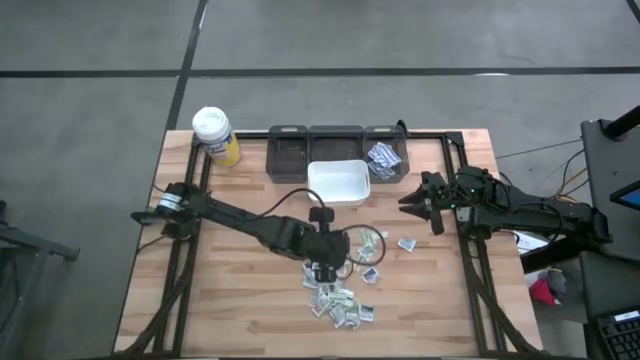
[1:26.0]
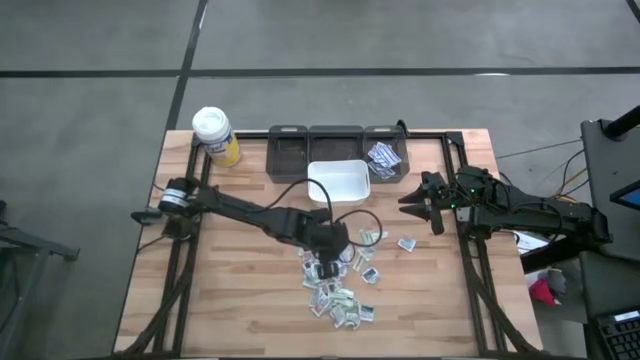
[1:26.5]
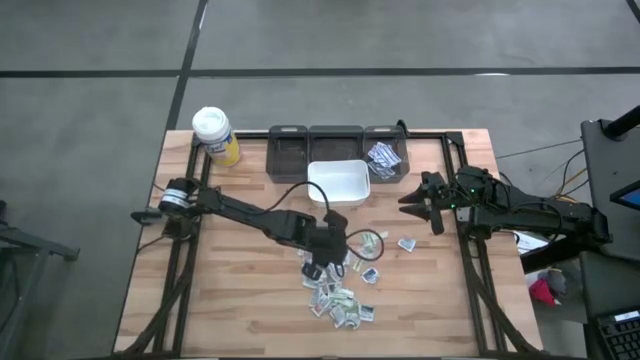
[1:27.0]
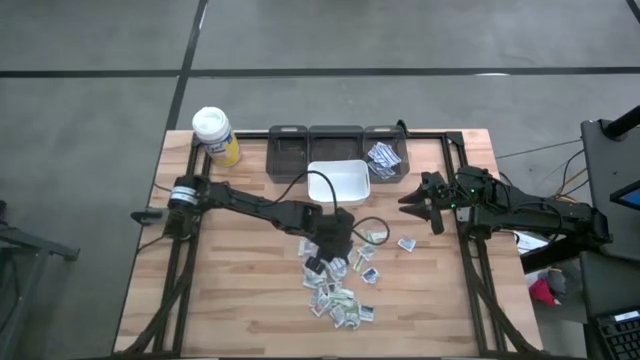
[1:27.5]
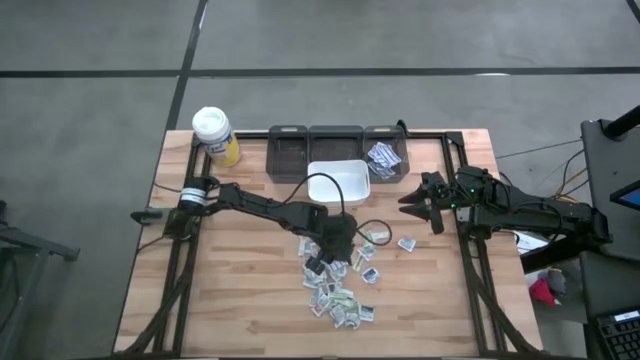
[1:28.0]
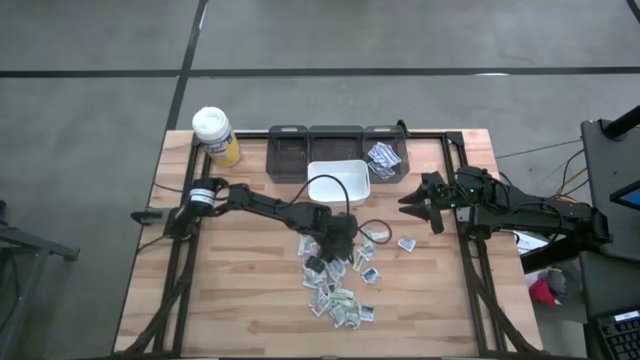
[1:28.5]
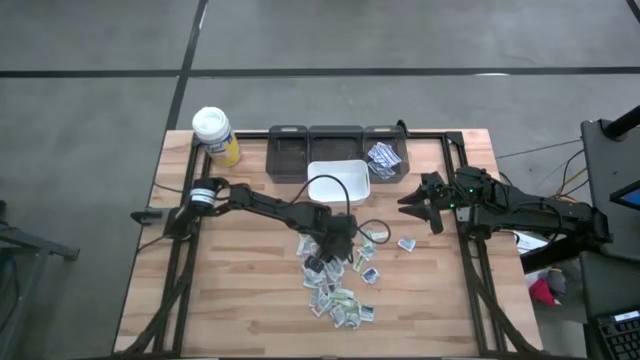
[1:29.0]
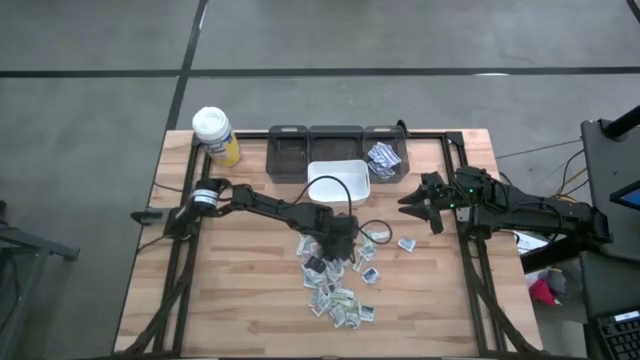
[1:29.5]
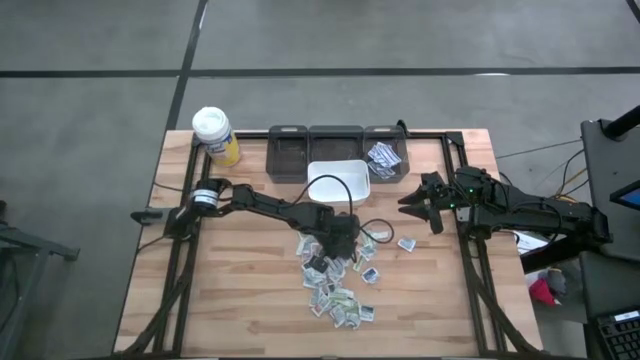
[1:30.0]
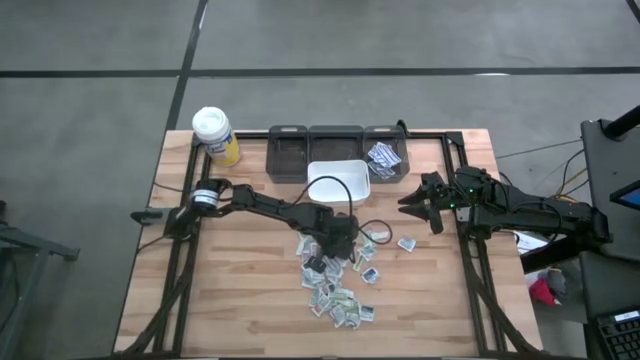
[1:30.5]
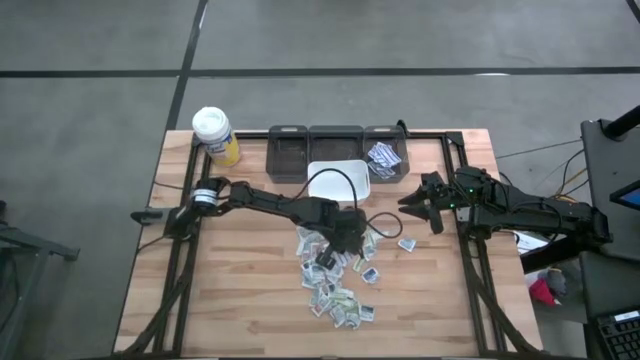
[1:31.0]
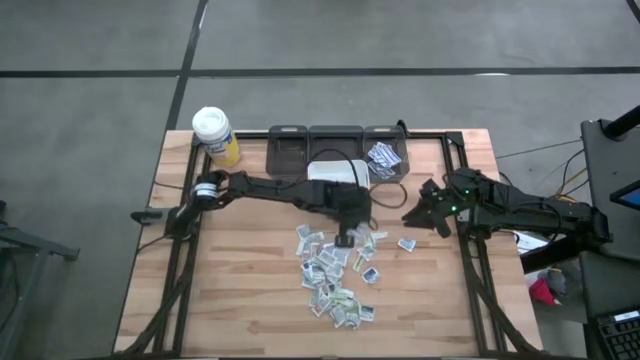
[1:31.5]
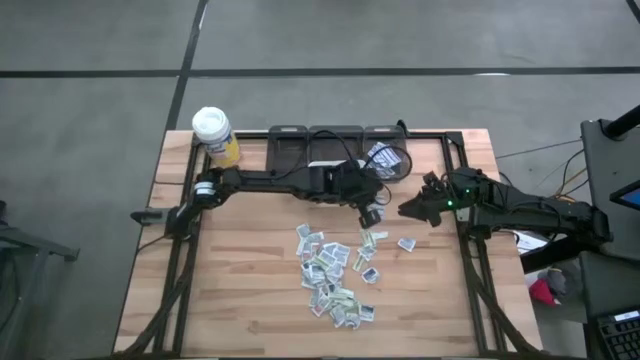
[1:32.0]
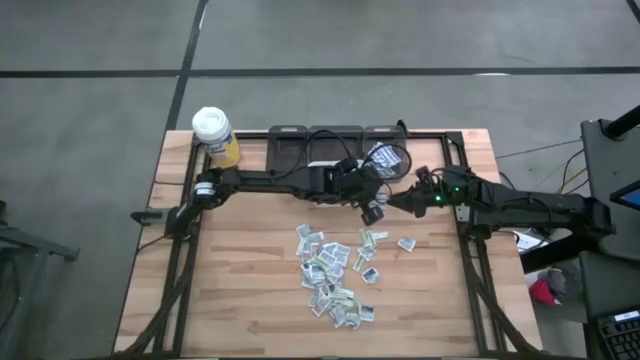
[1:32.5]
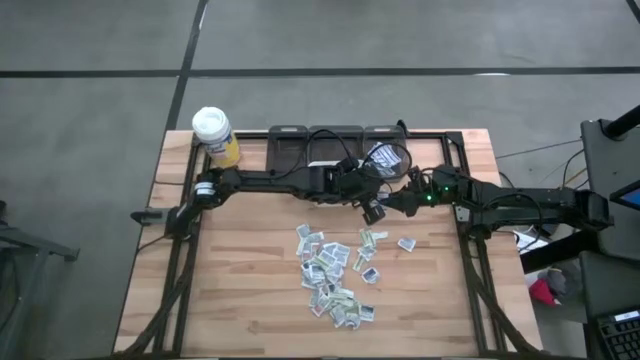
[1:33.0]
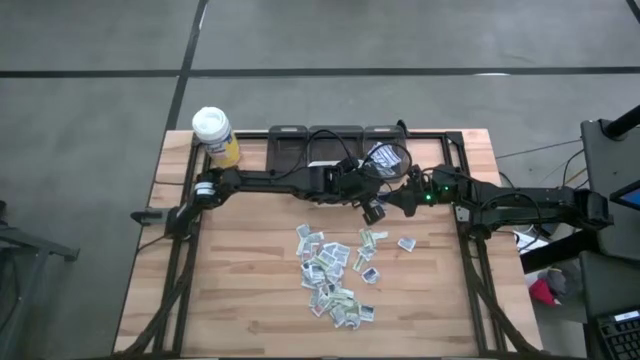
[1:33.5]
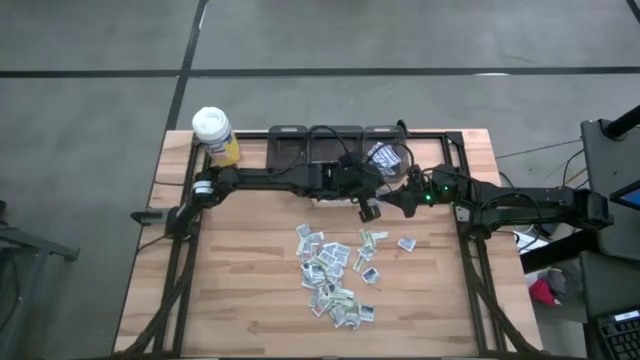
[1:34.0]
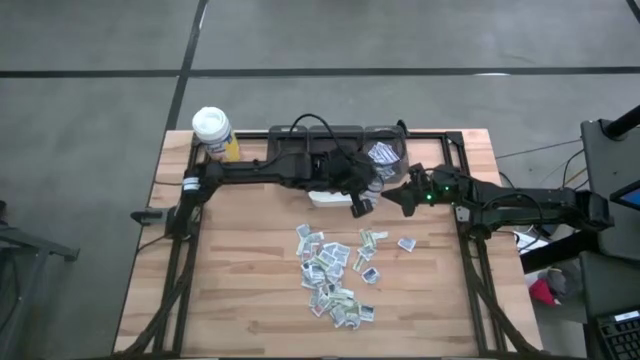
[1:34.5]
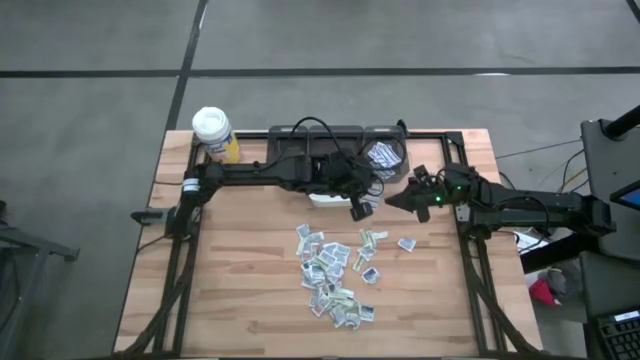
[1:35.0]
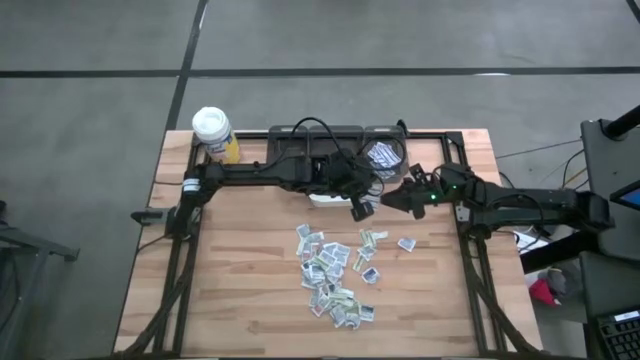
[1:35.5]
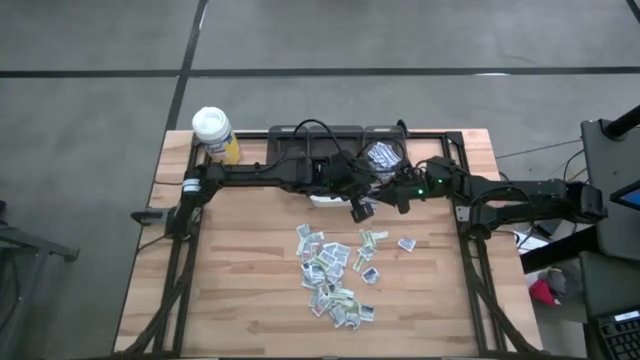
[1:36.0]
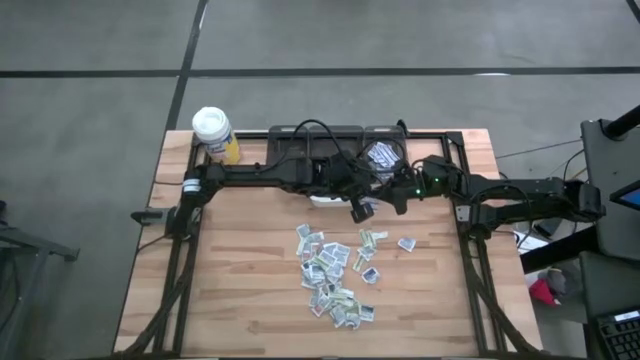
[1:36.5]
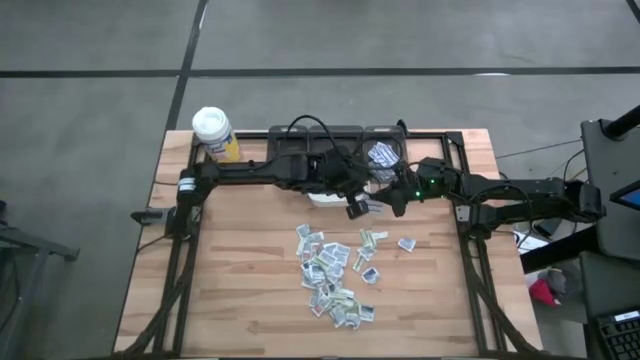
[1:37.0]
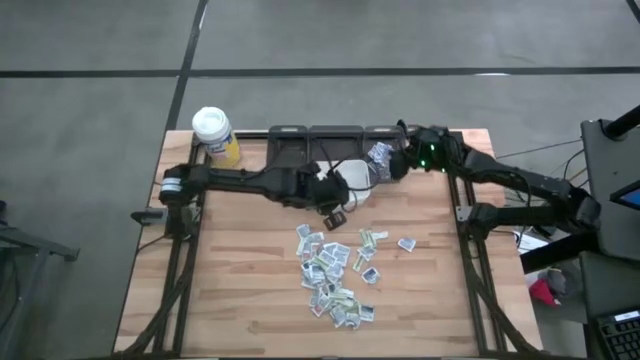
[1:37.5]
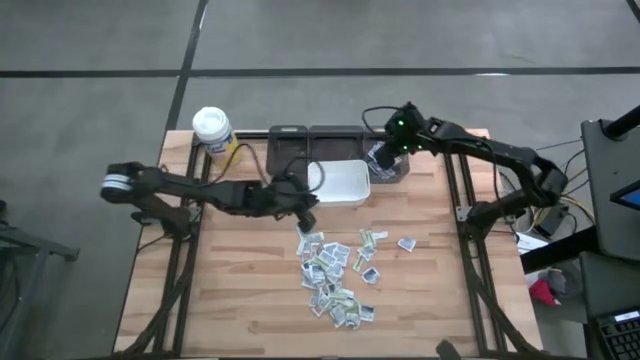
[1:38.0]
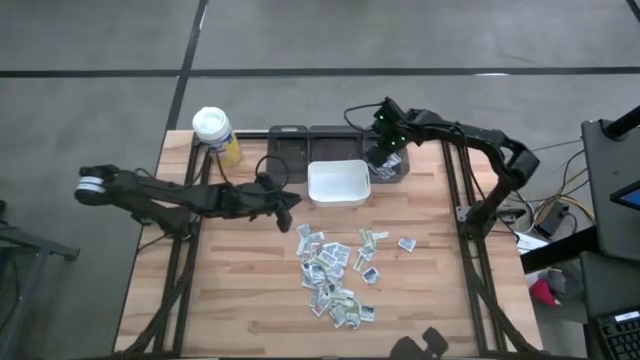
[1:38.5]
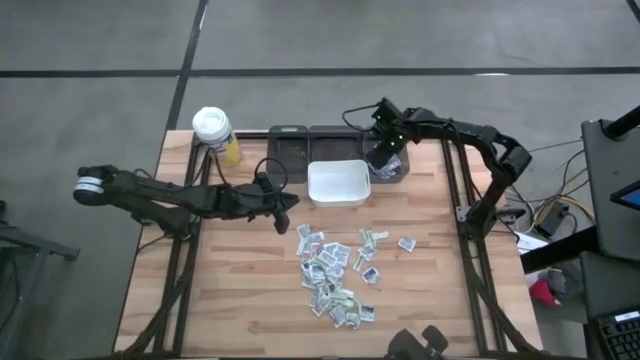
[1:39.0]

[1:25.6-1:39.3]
Task: Pick & Place First Aid Supplies
Put the blue bandage pack into the right black bin

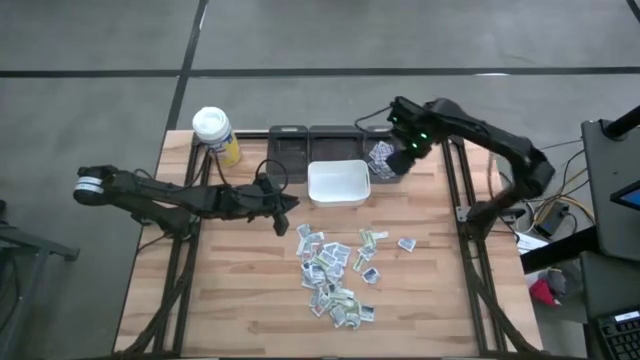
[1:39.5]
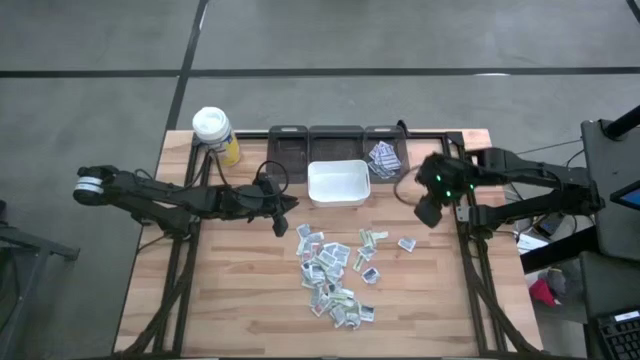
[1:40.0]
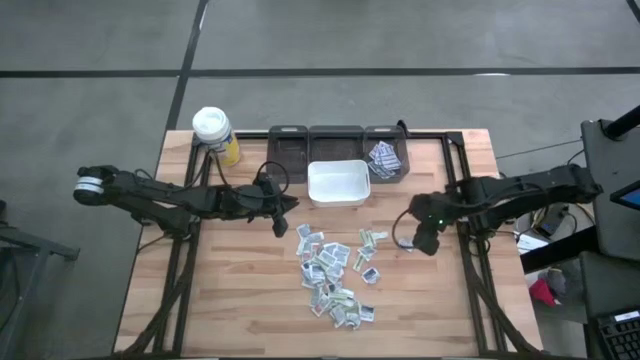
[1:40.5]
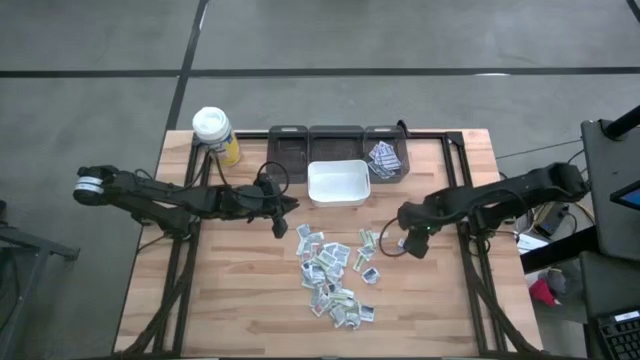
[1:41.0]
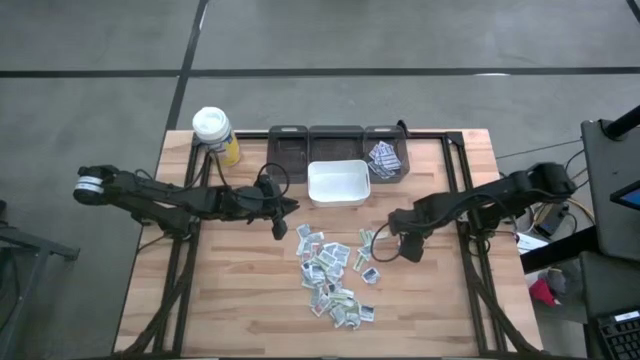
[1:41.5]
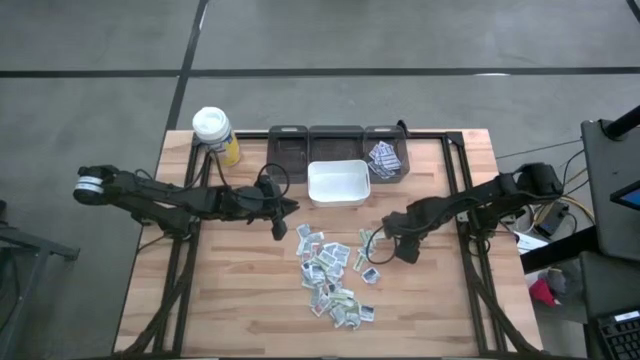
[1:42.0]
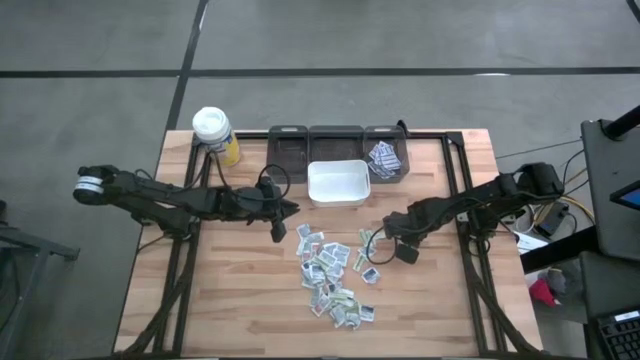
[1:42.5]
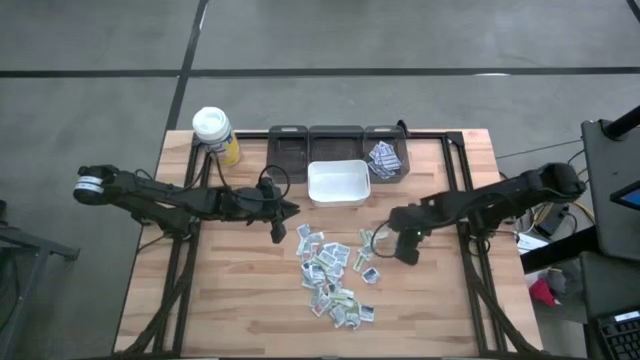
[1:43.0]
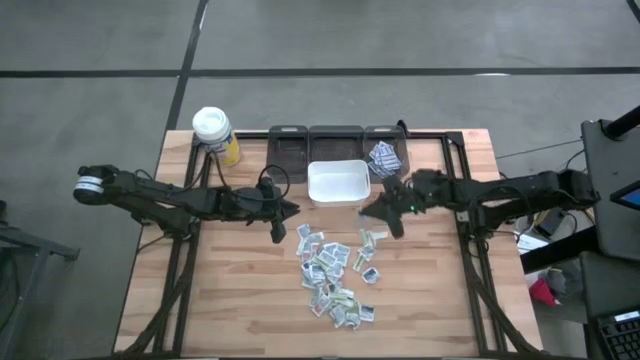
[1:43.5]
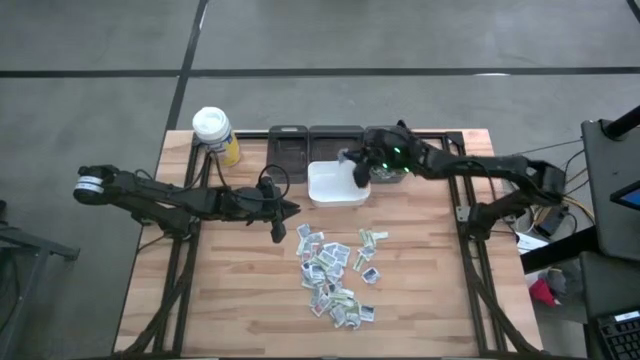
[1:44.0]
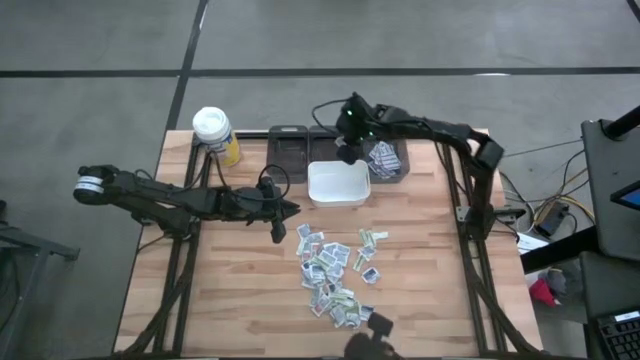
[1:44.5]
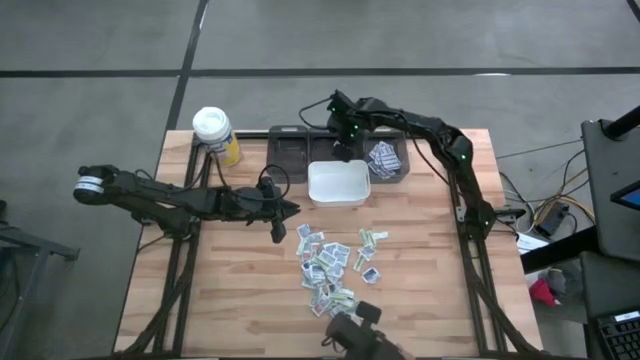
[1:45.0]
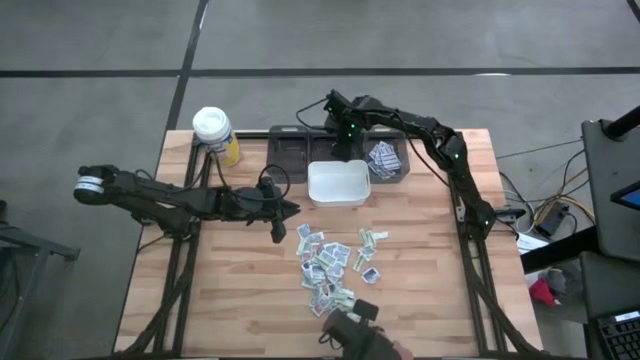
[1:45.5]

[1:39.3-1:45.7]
Put the alcohol pad into the middle black bin

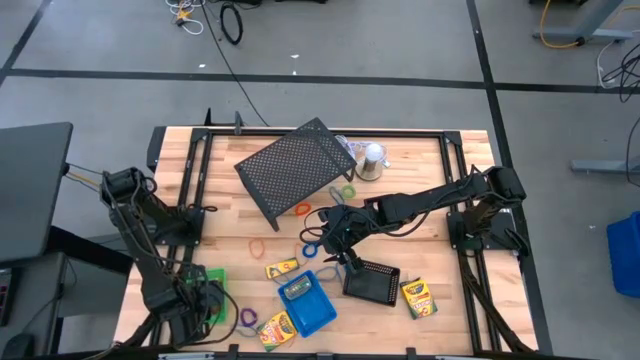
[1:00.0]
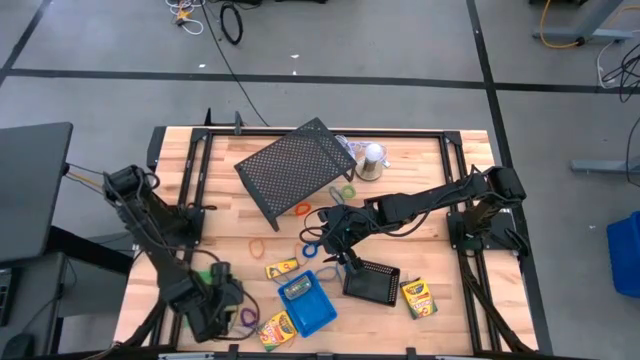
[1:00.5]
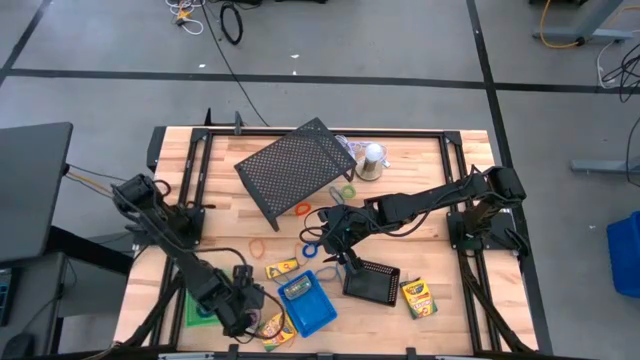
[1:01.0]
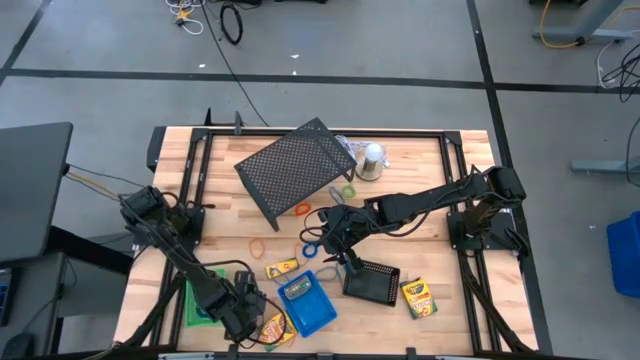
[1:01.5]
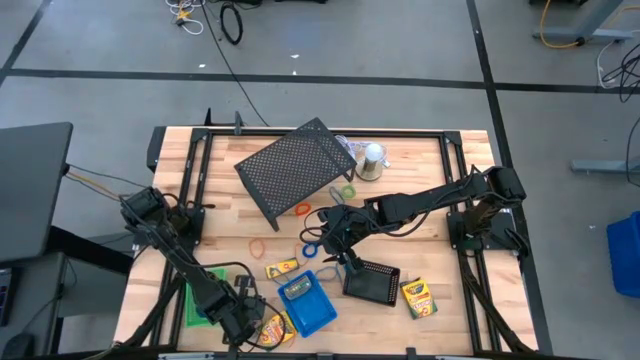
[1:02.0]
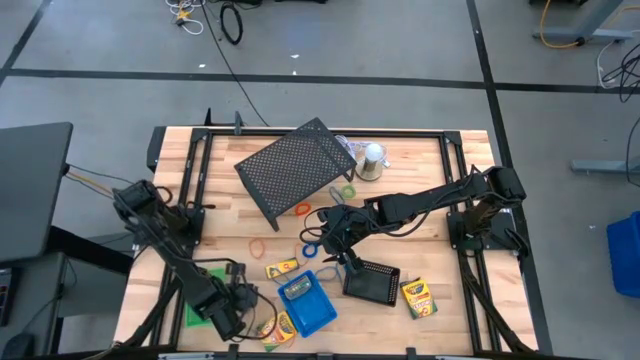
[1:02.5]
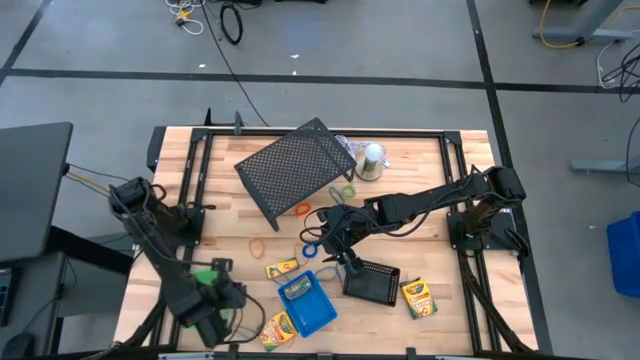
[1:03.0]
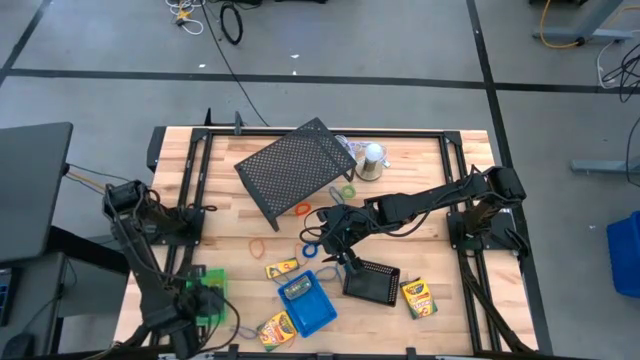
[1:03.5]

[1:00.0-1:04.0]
Task: Pick & Place Office Desk Supplies
Put the purple spiral keychain into the green bin
